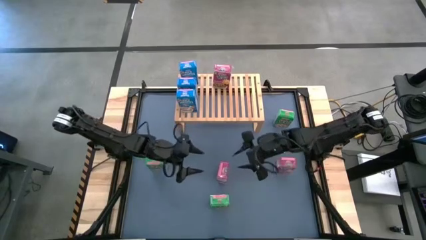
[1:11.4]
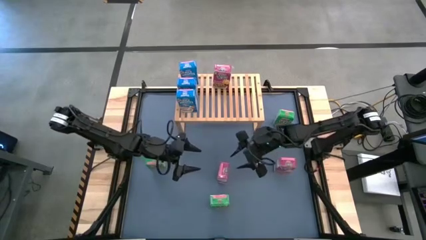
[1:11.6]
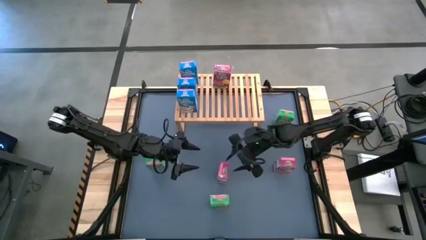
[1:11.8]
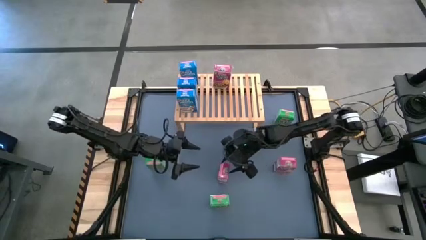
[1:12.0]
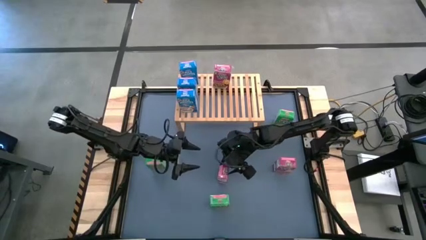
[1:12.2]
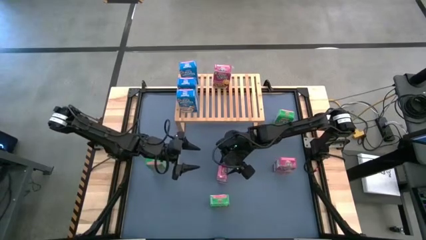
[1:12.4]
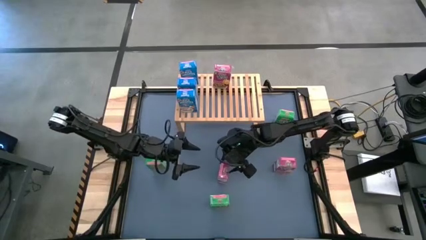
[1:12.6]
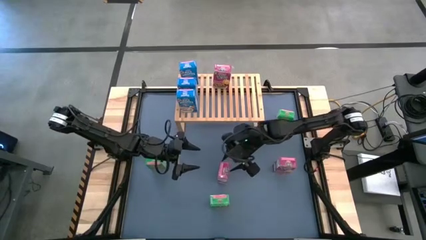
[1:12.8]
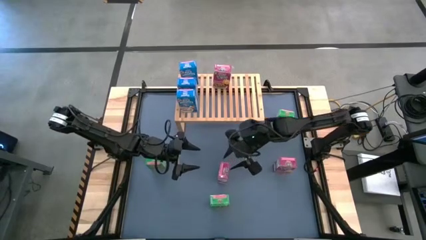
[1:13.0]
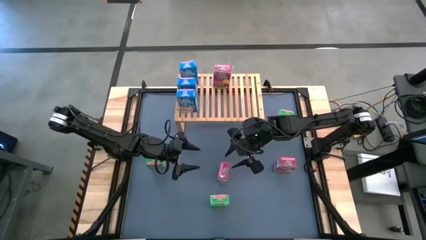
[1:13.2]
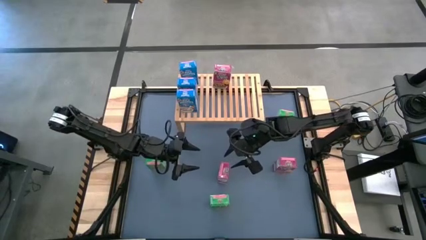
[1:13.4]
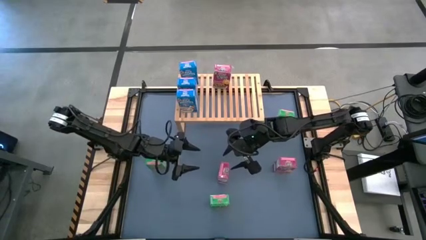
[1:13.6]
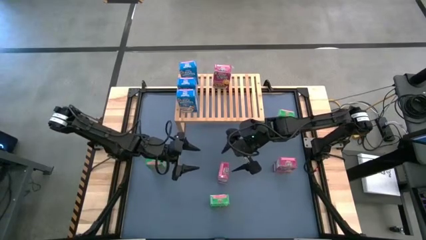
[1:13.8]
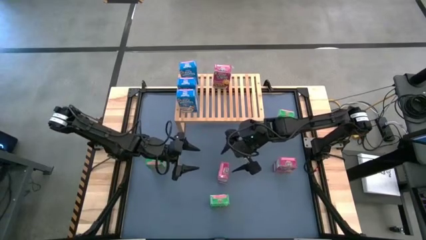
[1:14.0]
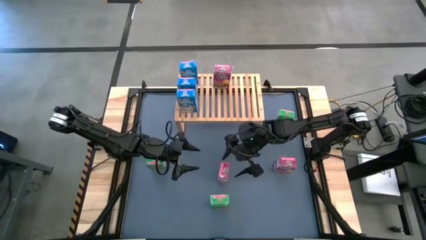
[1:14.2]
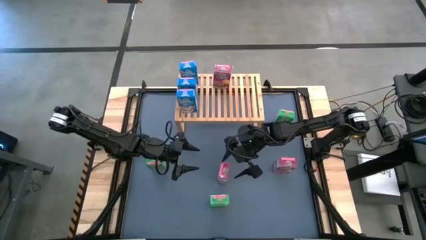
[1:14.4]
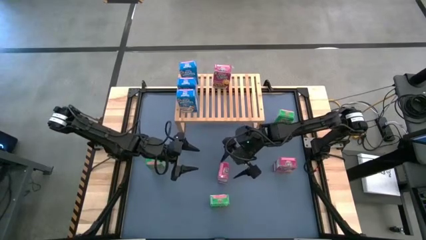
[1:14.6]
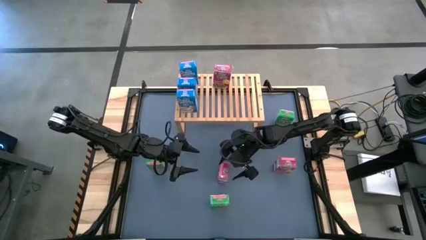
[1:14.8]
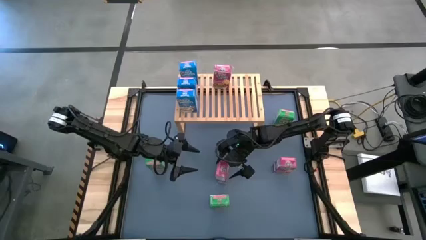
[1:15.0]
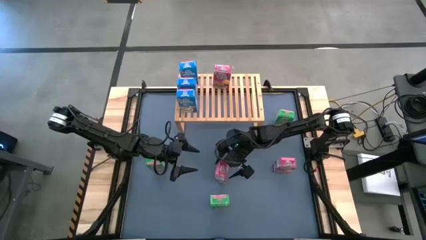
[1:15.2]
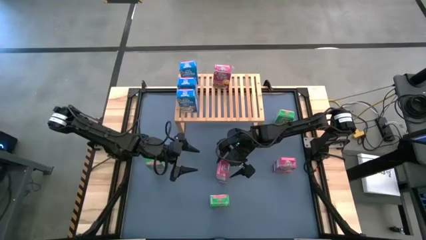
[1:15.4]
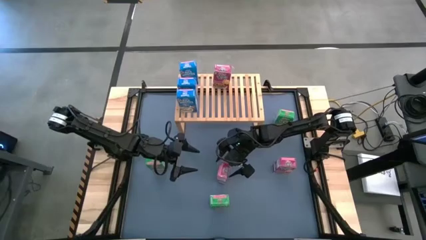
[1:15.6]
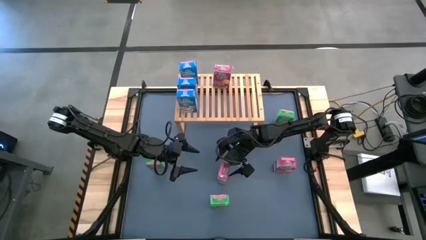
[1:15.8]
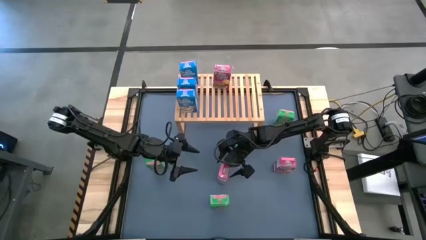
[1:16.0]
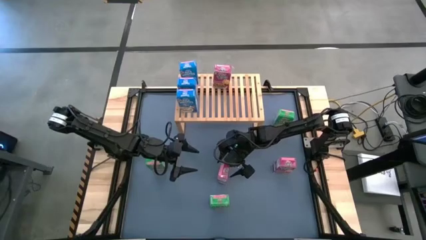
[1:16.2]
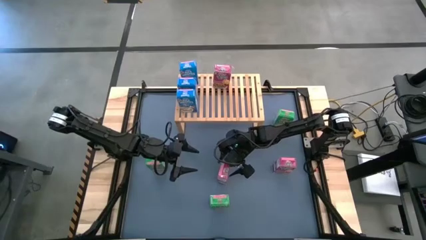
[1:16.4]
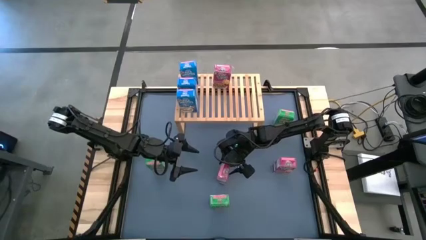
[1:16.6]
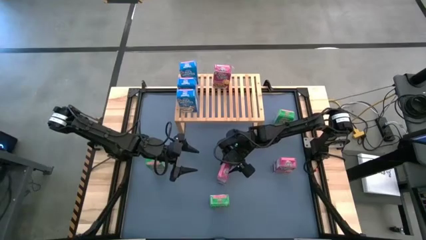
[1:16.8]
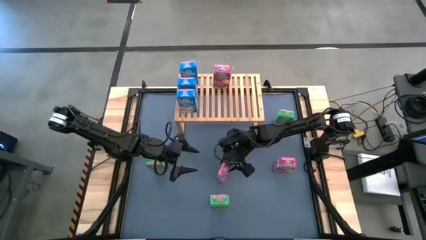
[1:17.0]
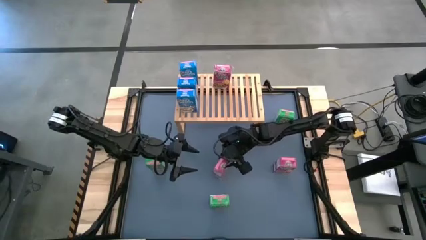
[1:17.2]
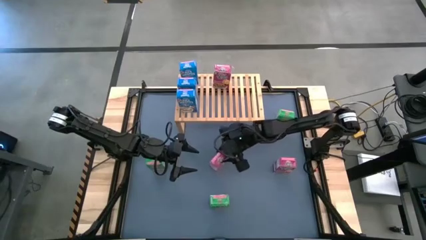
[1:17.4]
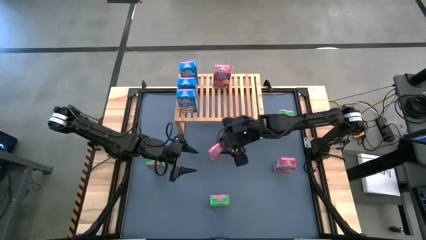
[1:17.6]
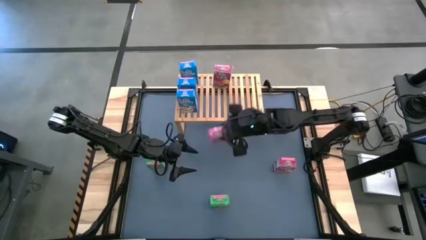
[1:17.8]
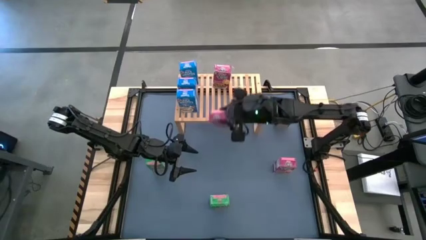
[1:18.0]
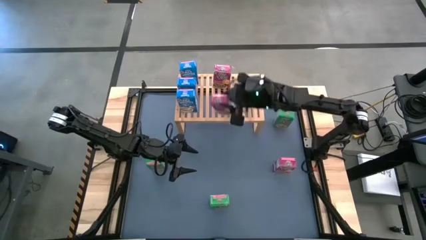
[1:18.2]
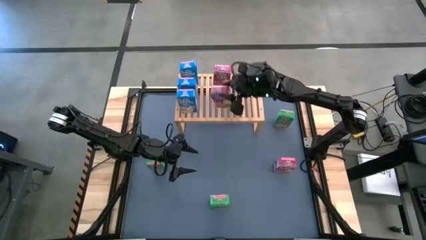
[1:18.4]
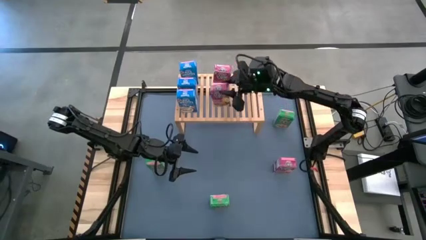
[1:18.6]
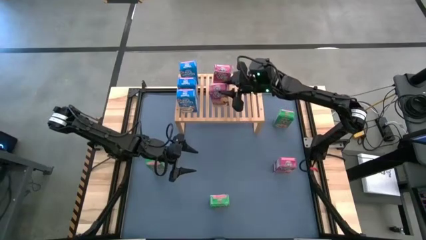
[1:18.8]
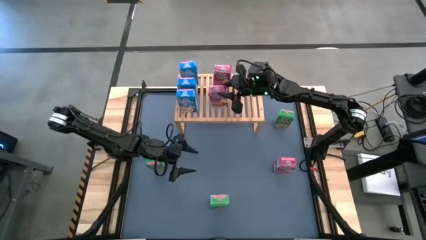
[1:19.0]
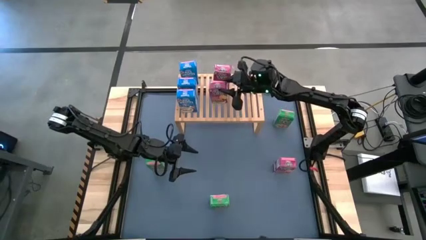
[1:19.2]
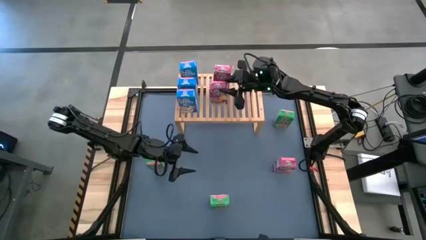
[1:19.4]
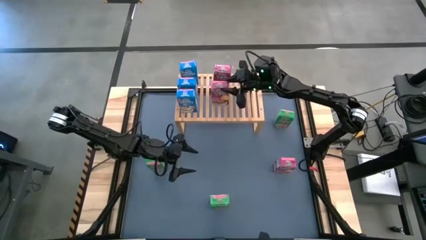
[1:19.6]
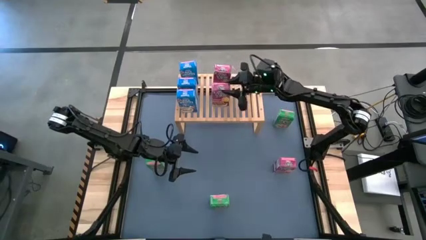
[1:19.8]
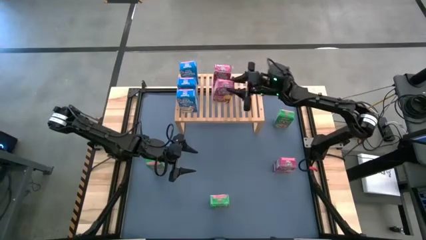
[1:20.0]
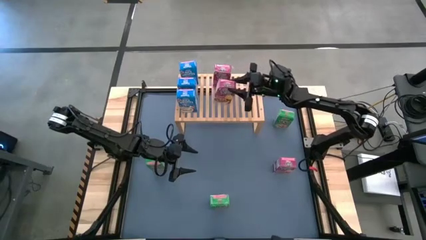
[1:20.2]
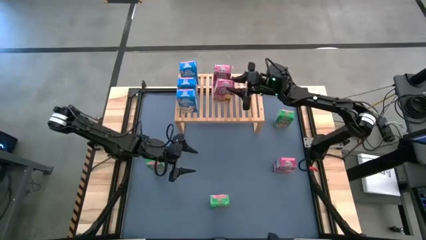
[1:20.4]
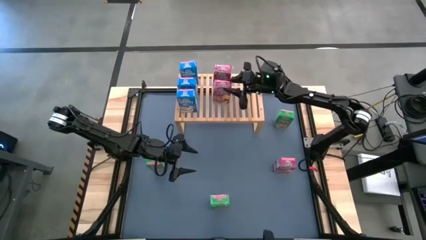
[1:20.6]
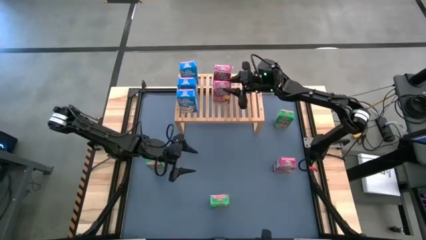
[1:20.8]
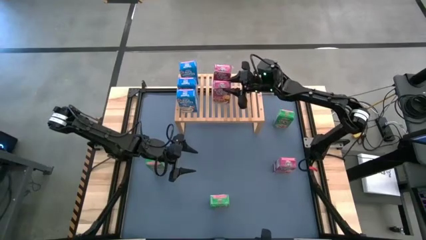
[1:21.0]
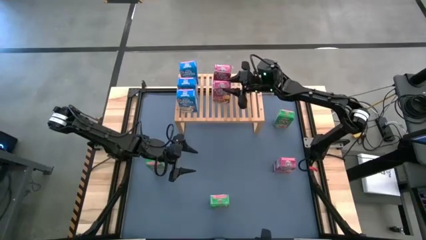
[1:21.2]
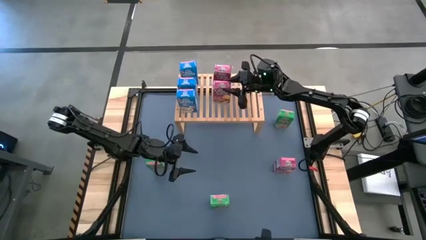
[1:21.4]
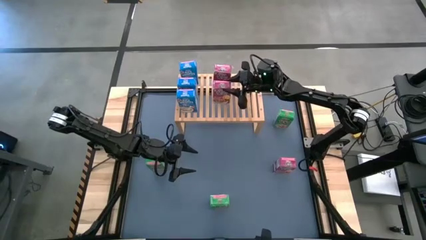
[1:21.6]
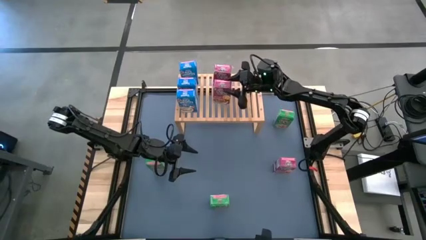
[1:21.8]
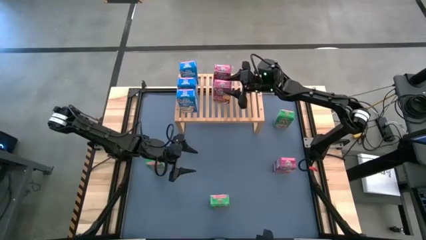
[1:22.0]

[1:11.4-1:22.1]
Task: Stack cereal on shelf
Put the left pink cereal box on the shelf aligned with the other pink cereal box

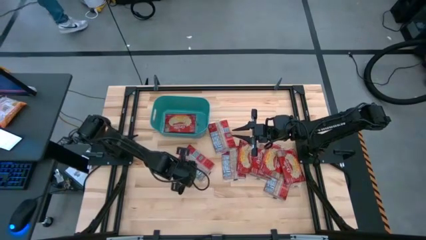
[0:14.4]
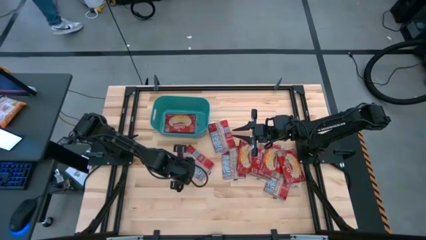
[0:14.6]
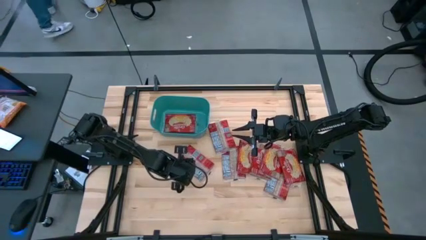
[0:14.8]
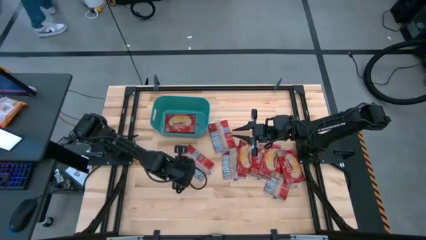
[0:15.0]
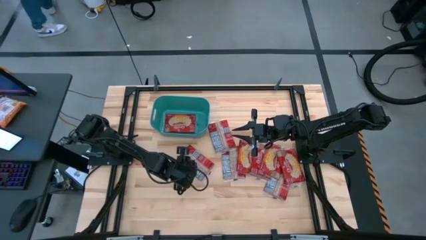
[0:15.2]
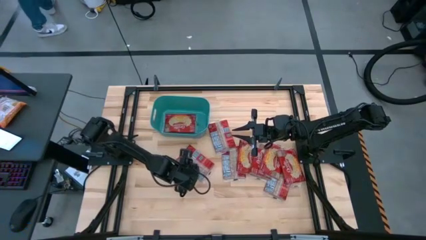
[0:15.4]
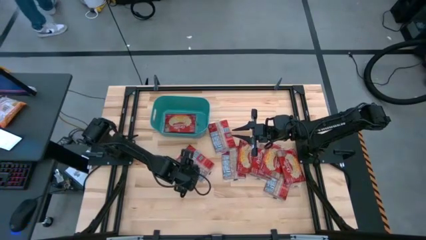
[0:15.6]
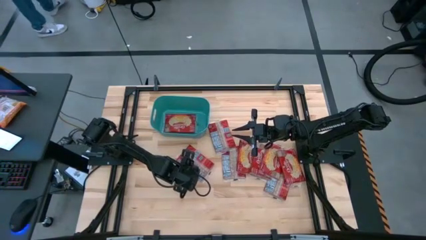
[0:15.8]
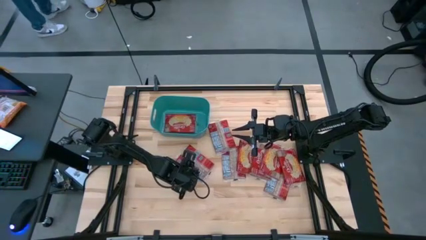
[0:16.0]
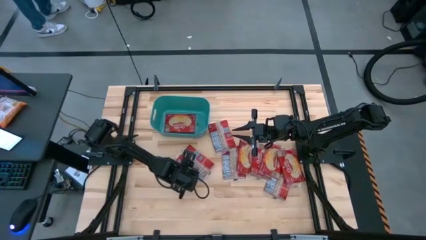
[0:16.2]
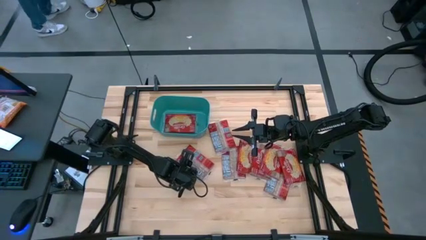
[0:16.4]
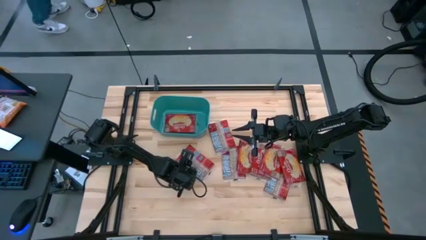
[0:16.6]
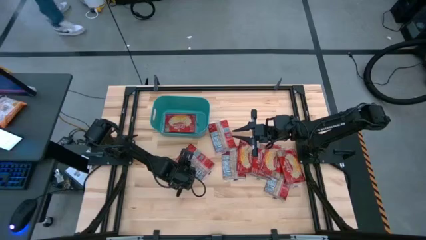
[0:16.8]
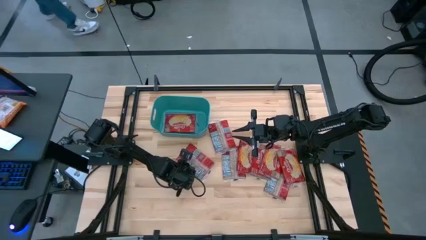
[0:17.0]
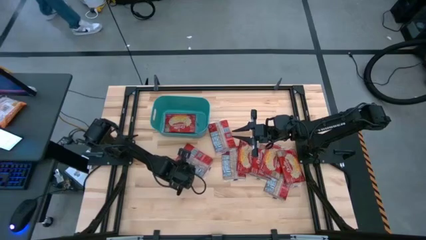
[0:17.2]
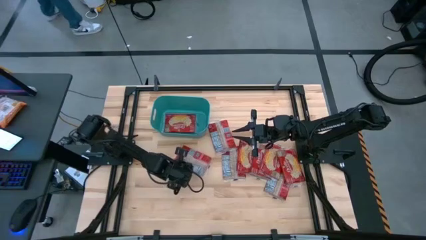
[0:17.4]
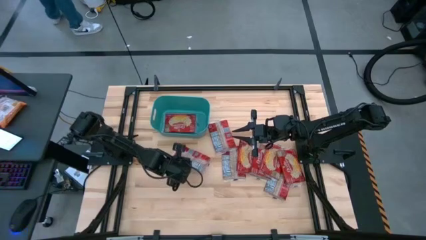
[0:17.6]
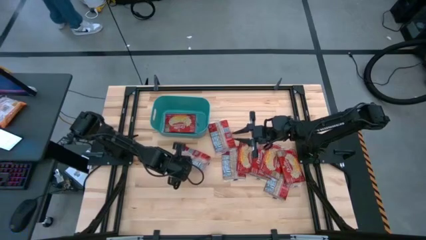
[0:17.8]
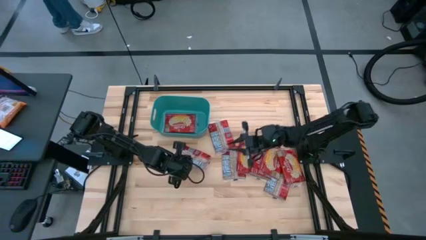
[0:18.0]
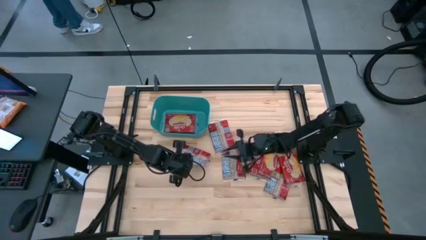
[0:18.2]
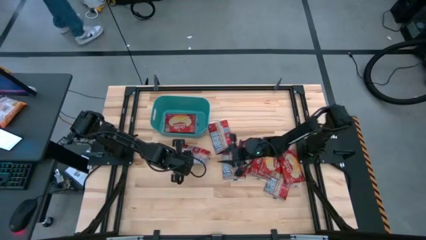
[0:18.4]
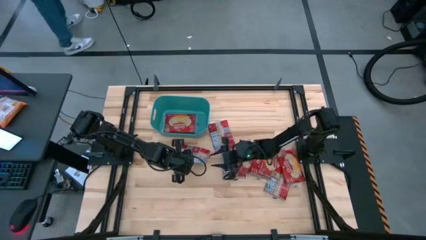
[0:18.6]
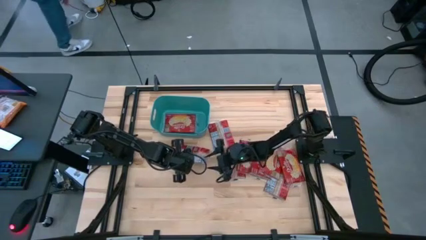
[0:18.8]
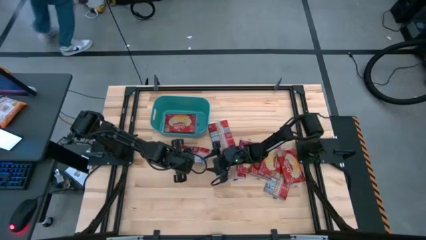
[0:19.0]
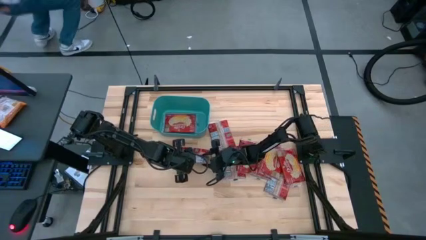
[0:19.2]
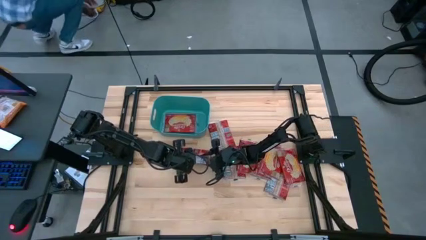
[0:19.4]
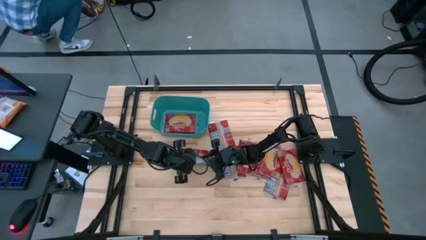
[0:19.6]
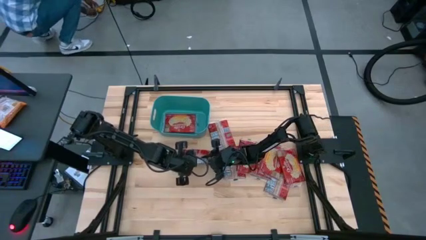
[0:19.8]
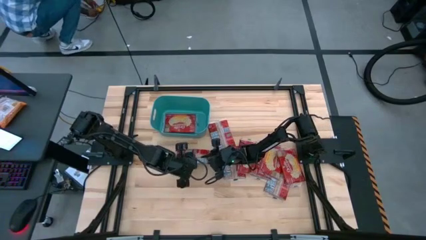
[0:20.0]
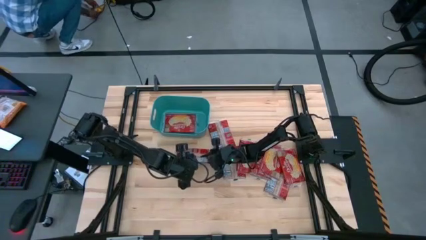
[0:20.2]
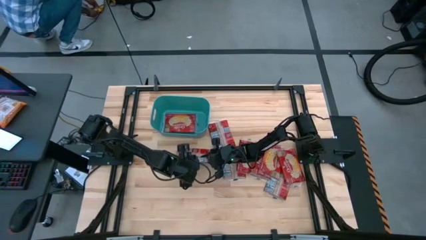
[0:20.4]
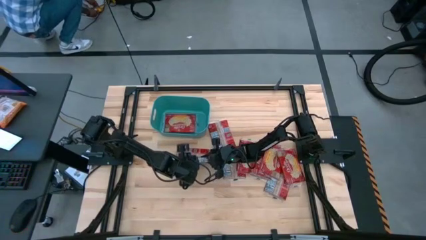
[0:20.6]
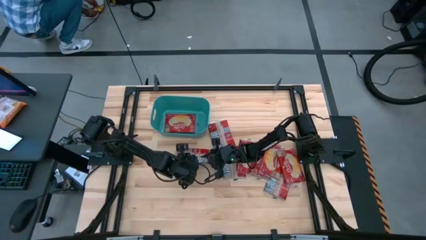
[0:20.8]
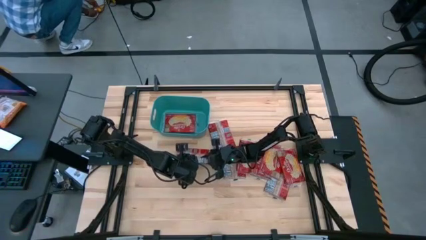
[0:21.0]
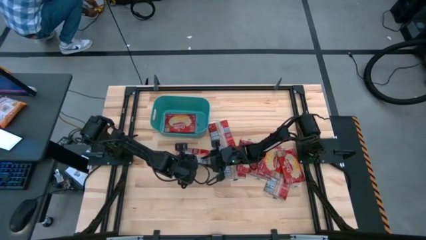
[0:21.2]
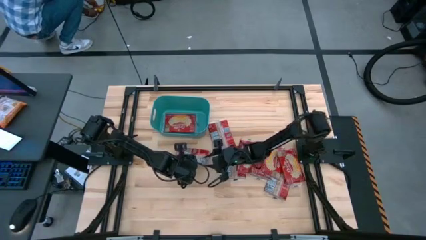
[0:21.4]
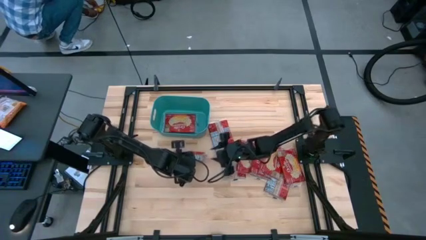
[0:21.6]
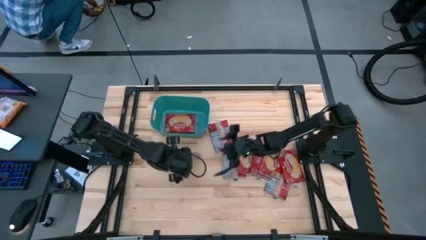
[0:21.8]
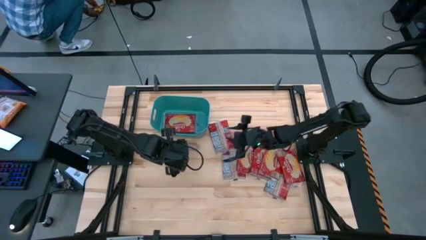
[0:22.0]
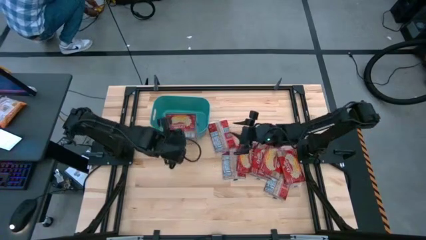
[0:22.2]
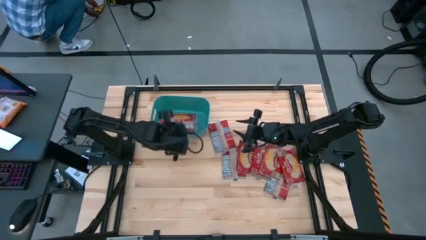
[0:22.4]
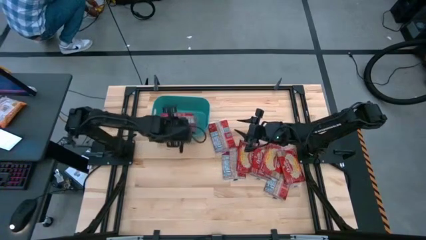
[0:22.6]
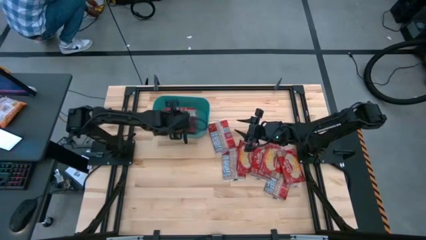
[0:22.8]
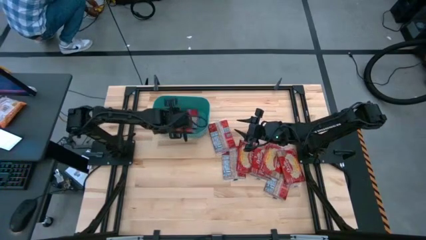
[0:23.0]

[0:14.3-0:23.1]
Task: Sort popcorn bags into baskets
Put the red popcorn pack into the green bin
